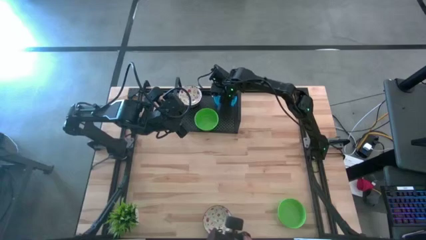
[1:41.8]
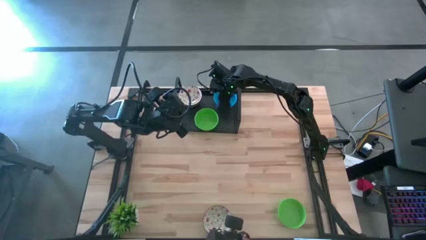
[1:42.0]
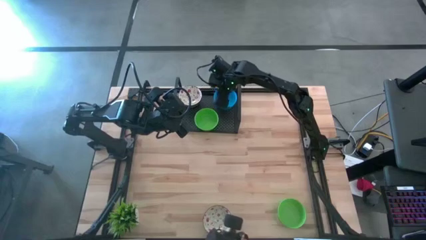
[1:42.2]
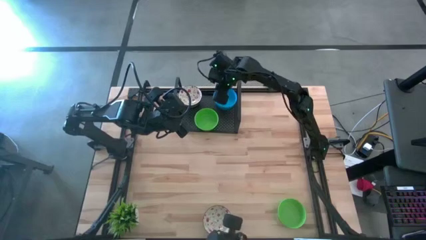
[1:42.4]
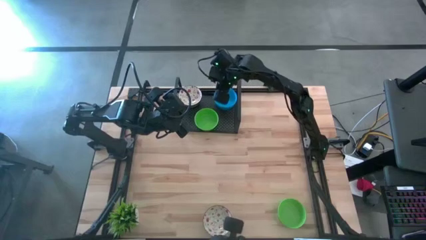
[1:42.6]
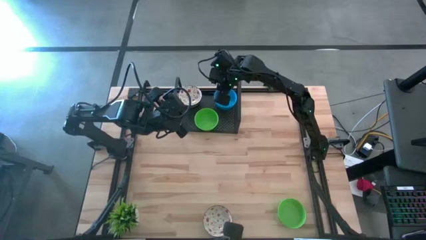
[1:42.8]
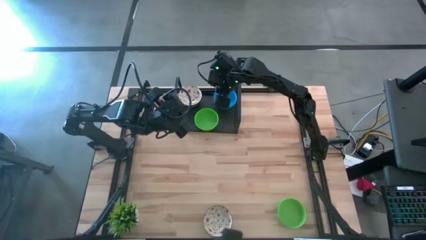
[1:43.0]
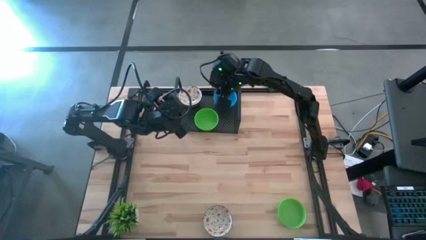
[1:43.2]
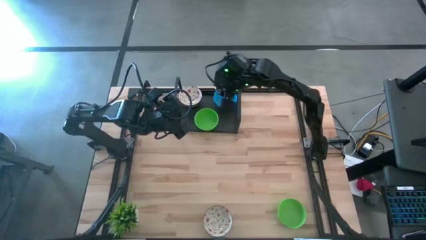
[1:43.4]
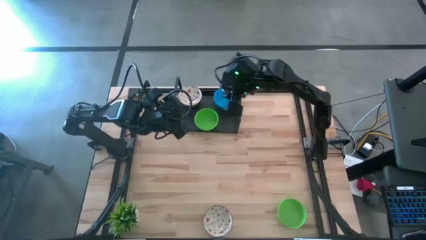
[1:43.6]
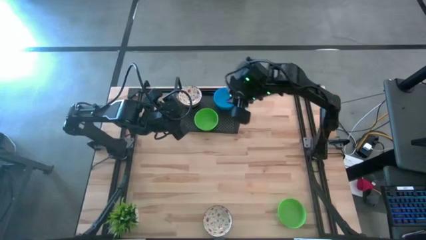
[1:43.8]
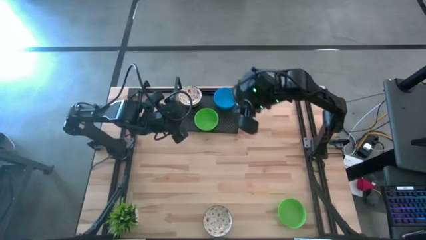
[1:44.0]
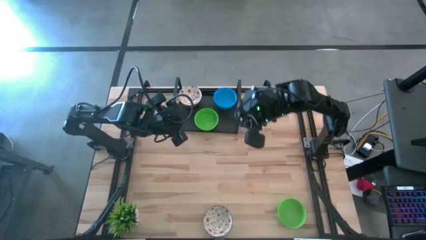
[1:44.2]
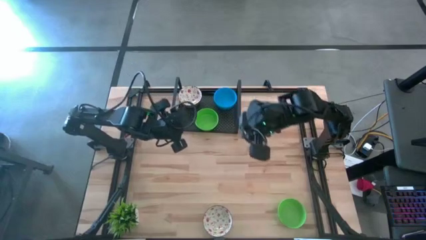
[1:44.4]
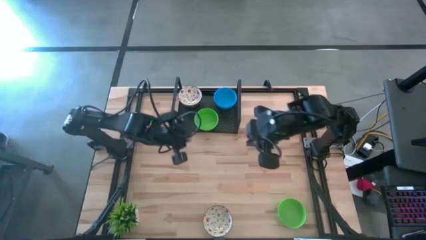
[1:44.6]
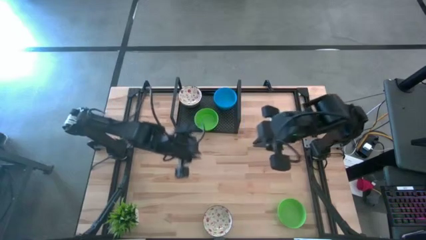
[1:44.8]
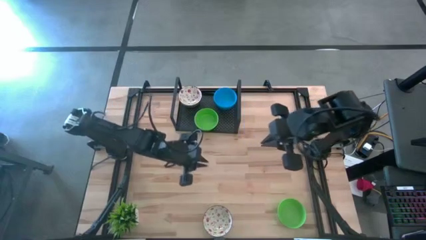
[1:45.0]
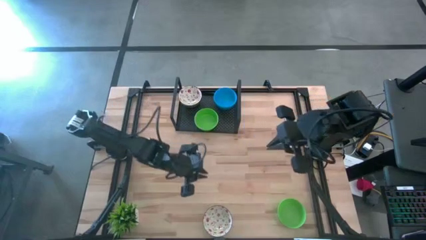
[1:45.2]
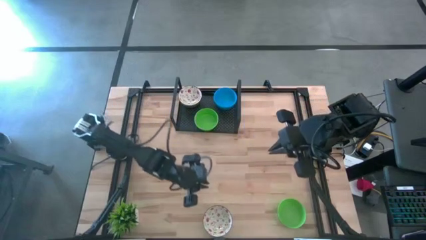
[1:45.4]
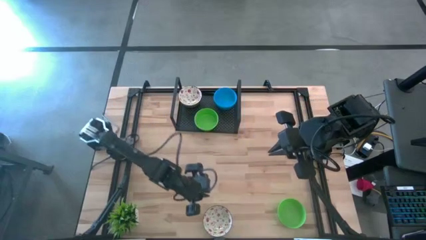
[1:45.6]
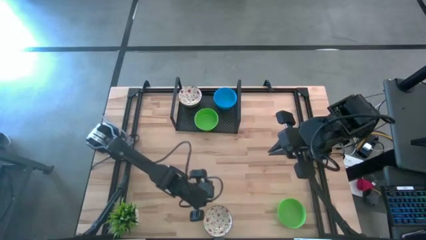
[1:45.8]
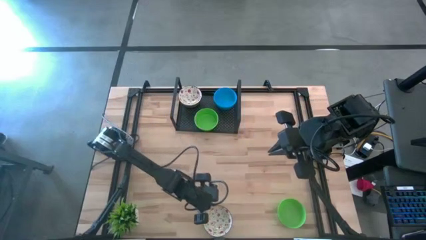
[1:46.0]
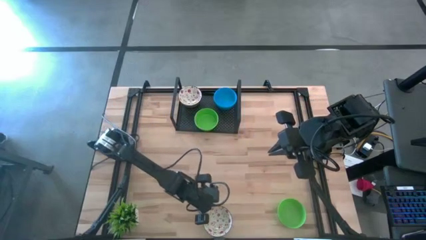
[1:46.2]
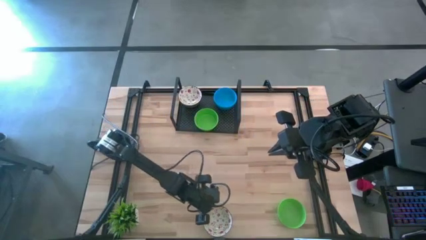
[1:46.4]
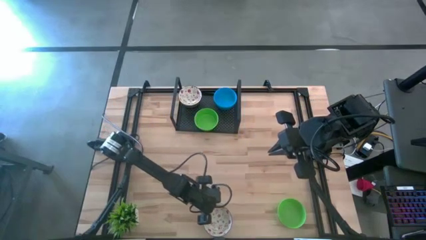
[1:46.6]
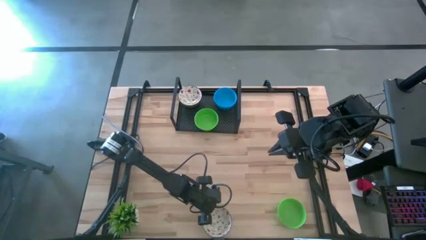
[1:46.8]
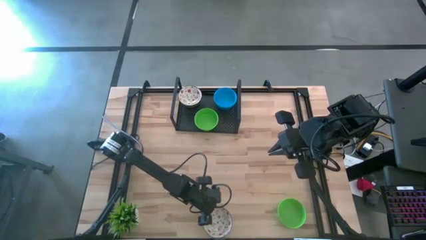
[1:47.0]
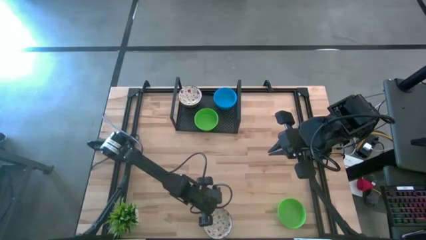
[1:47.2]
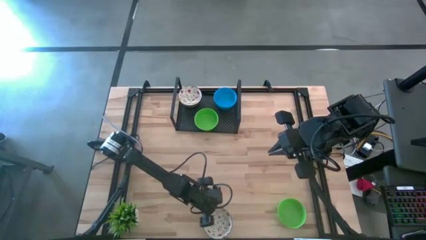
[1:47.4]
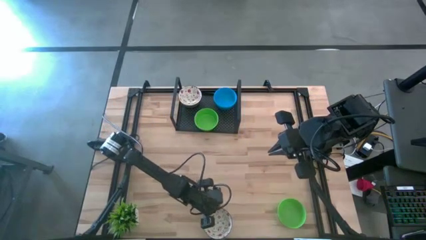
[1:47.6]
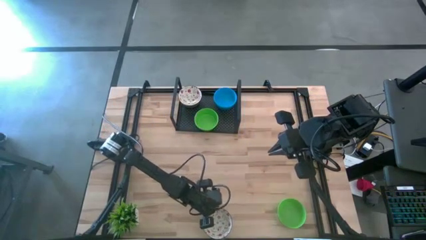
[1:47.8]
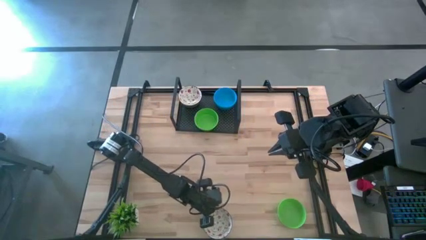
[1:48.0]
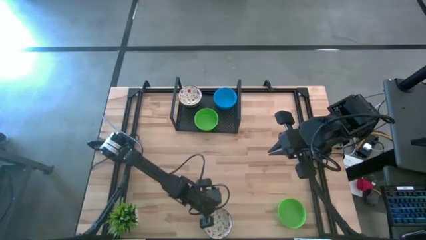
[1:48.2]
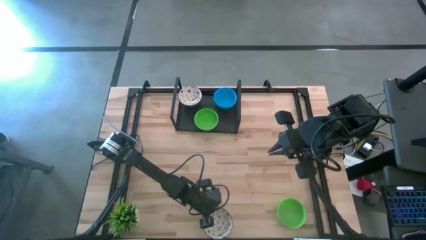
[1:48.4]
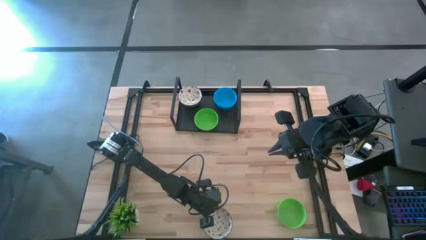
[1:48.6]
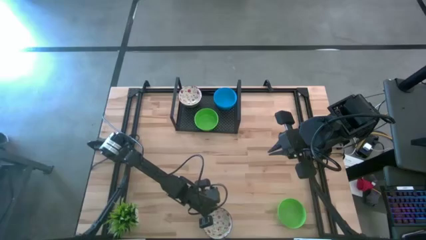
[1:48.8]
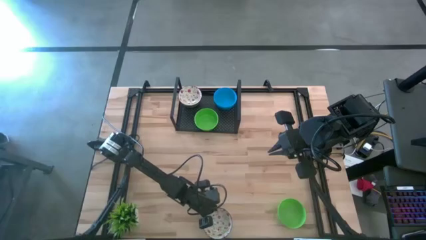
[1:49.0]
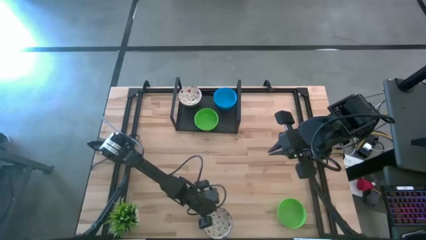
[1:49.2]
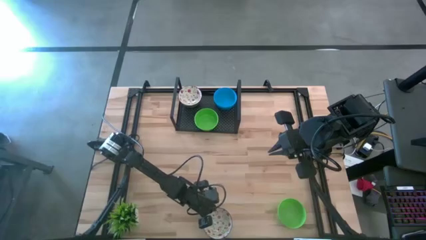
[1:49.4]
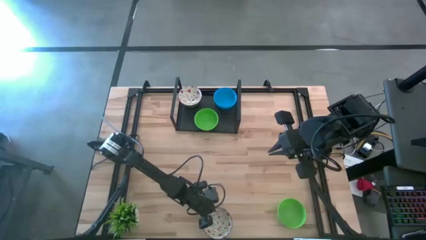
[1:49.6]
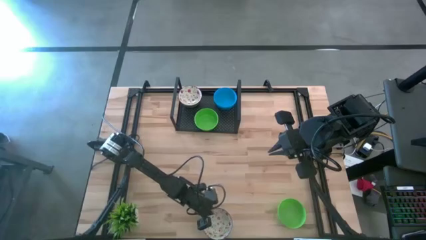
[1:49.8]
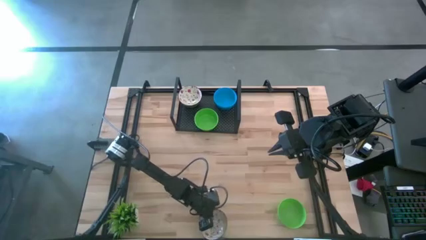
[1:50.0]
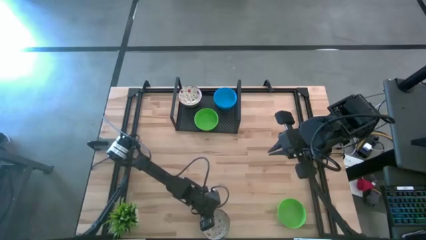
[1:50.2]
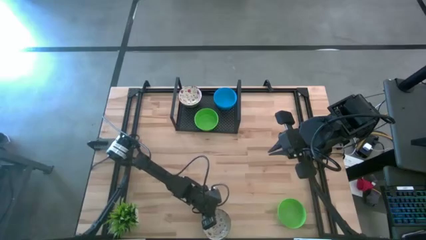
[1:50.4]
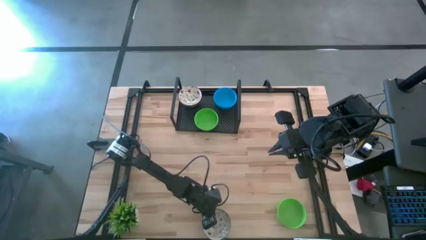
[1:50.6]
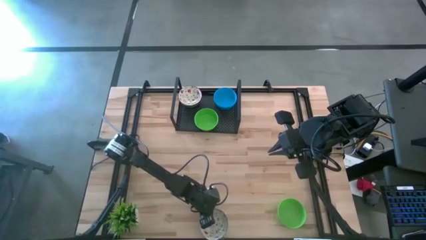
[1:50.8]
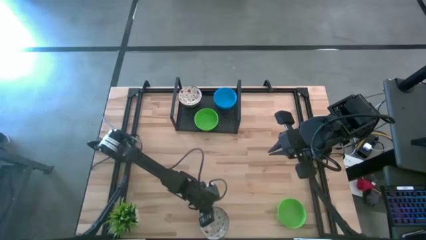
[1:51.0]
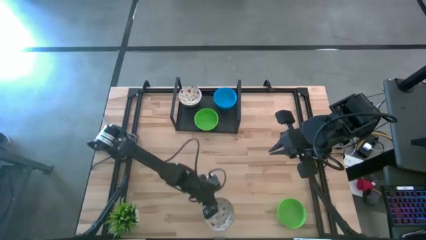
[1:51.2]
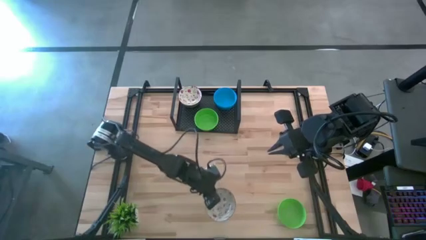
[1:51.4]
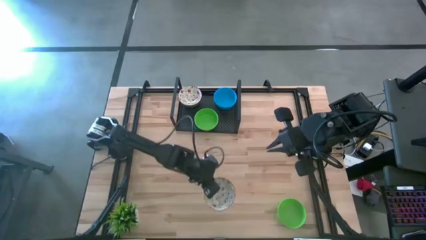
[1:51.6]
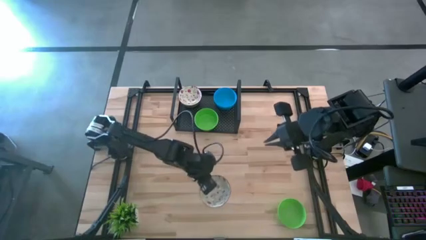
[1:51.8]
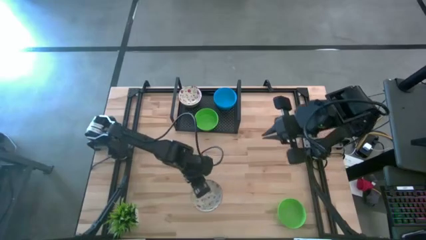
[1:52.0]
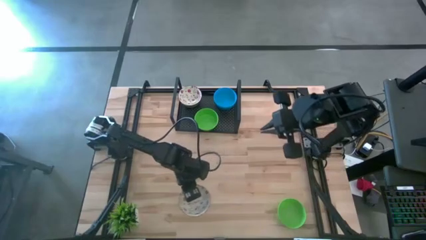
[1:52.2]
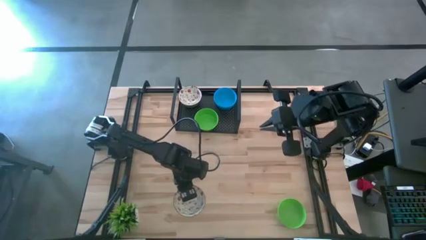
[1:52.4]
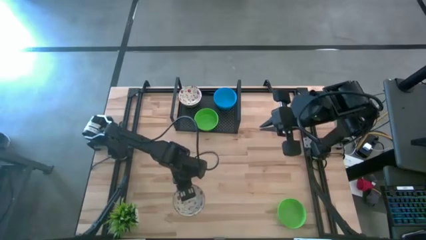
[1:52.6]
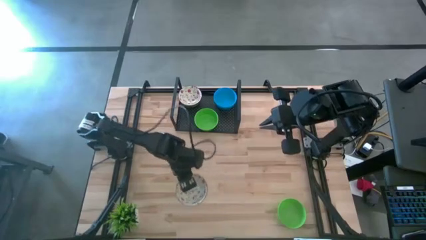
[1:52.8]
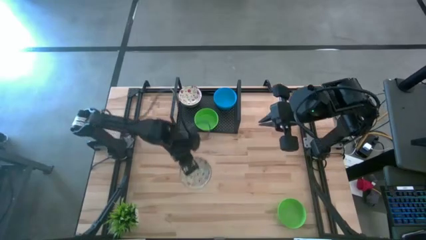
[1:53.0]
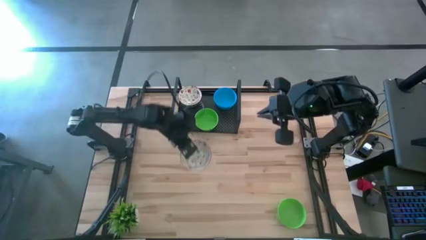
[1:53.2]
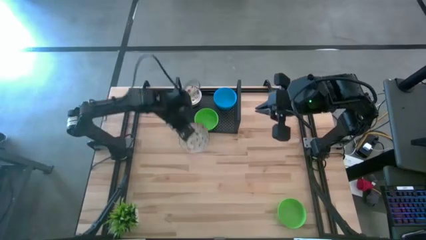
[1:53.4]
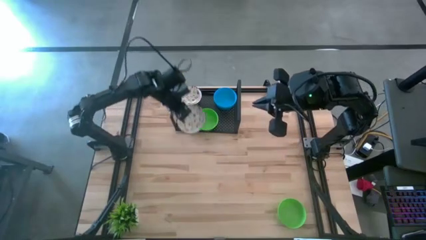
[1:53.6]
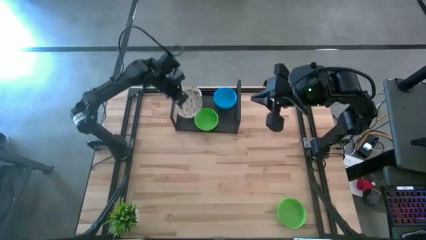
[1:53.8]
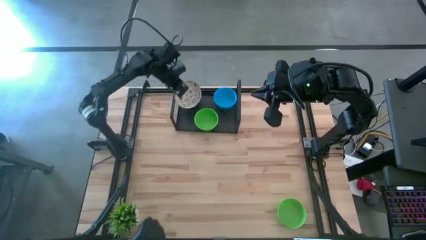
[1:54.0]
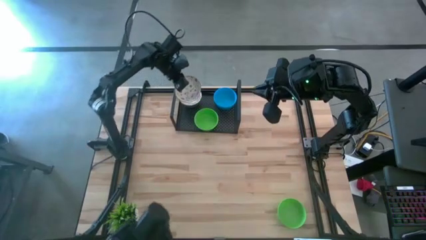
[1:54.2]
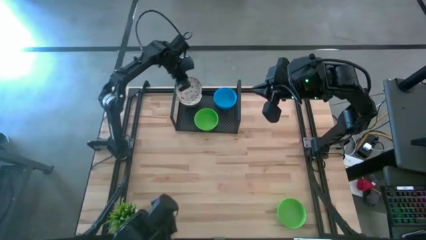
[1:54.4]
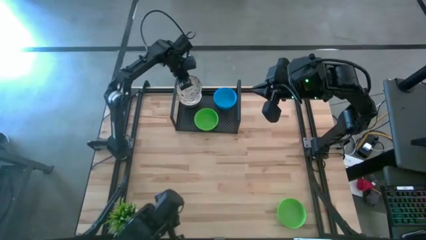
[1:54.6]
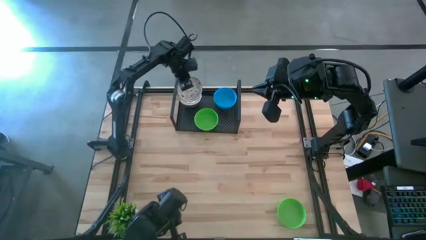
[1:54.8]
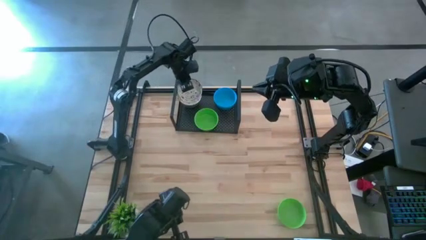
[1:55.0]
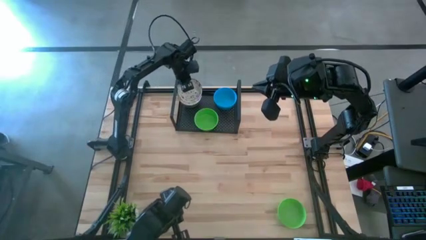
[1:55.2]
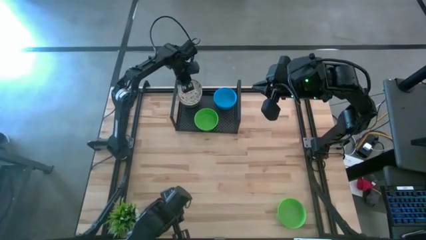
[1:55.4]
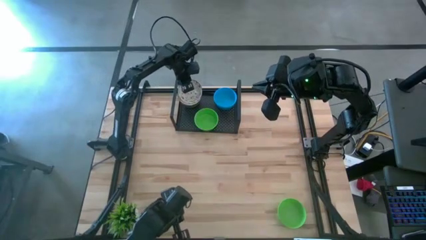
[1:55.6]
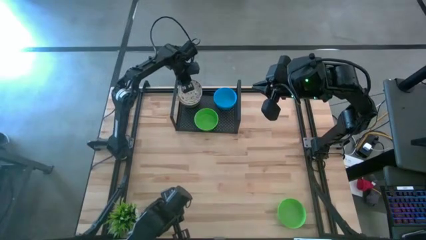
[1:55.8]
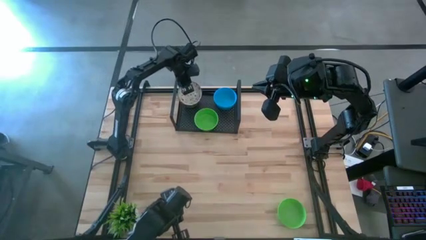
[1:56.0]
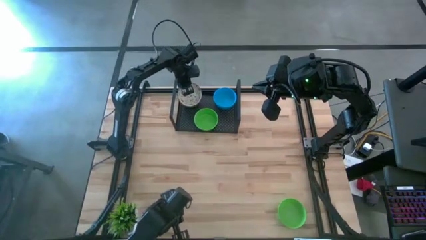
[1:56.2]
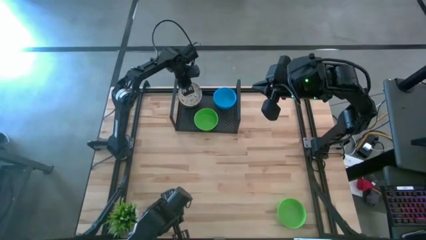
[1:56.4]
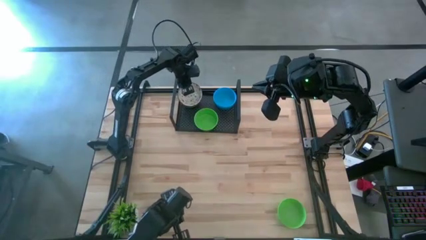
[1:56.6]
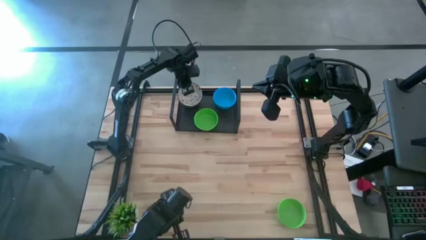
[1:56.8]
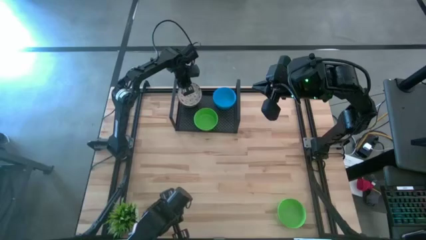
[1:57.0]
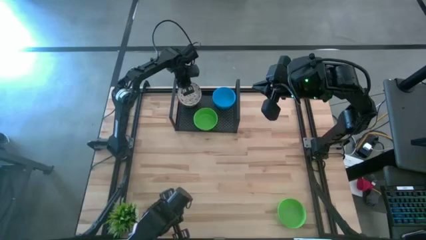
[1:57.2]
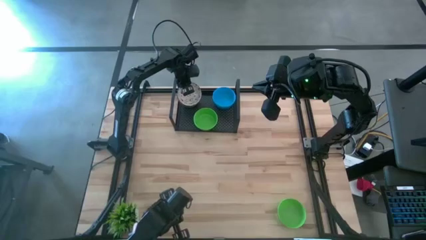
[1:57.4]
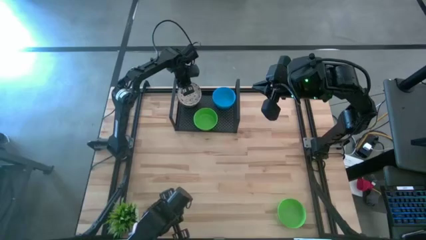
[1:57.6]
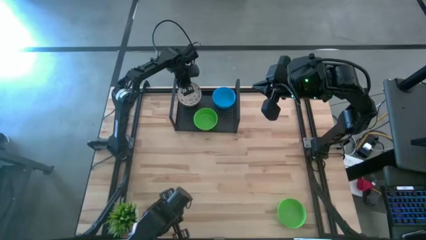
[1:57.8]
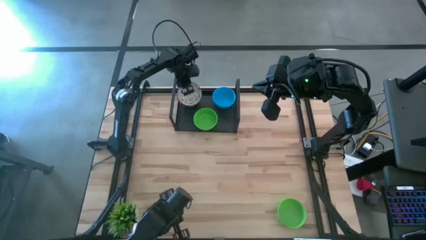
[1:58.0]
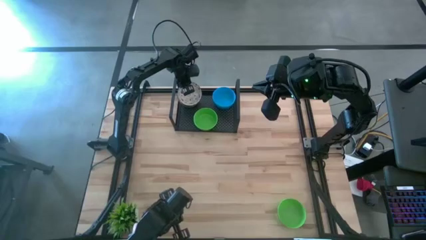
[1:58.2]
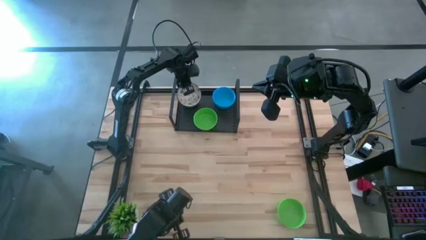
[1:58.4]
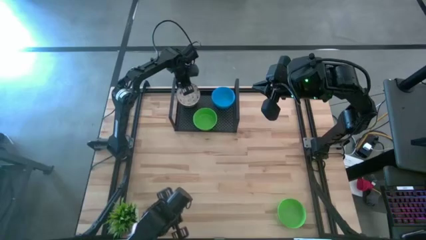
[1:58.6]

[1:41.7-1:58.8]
Task: Pick & Place Mini bowls
Stack the white bowl on top of the white bowls on the shelf
